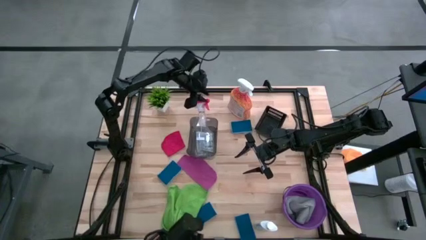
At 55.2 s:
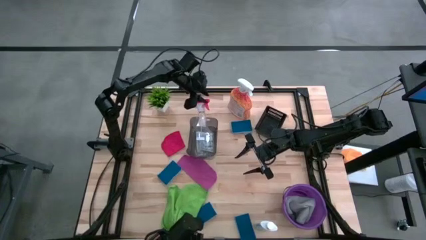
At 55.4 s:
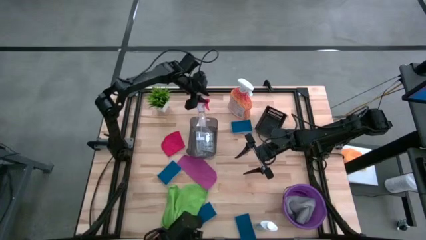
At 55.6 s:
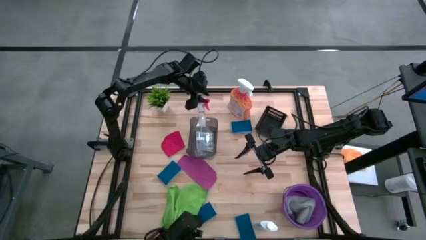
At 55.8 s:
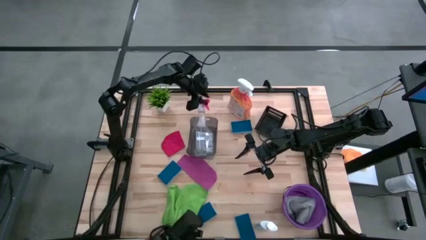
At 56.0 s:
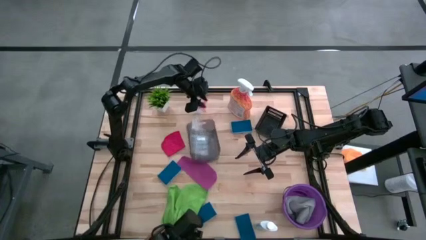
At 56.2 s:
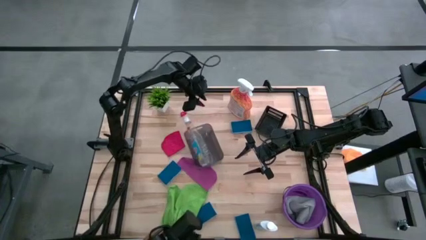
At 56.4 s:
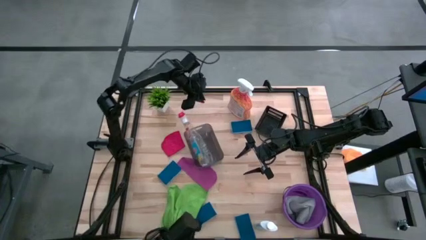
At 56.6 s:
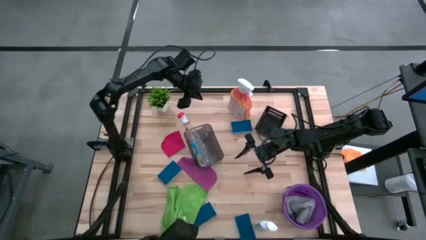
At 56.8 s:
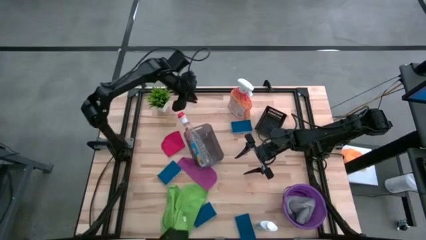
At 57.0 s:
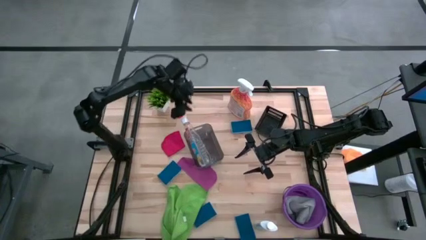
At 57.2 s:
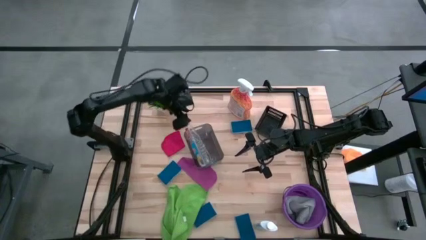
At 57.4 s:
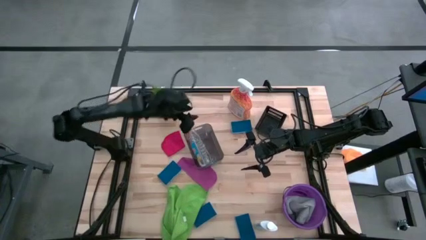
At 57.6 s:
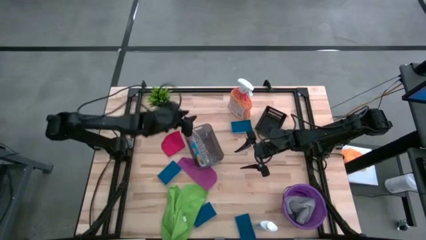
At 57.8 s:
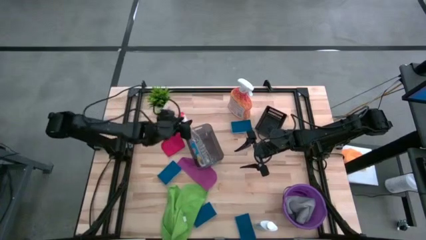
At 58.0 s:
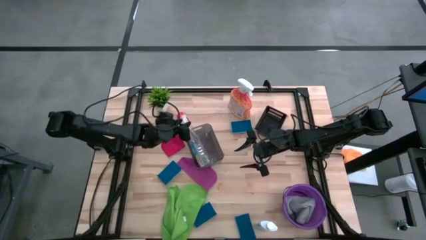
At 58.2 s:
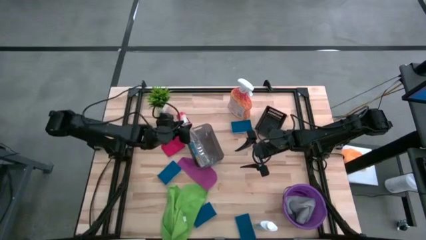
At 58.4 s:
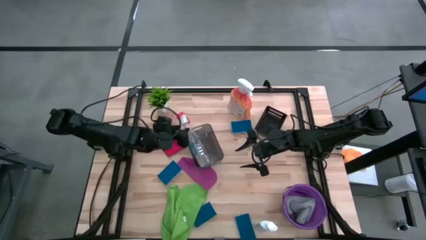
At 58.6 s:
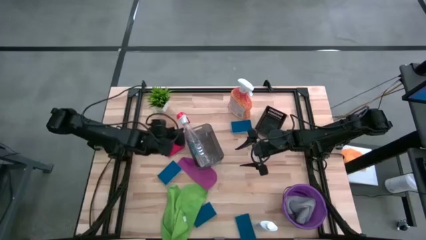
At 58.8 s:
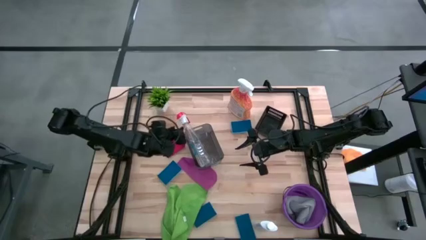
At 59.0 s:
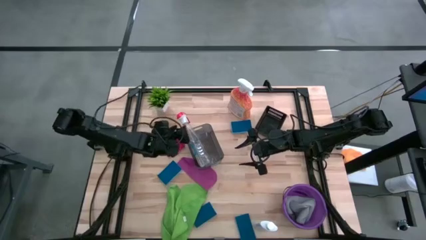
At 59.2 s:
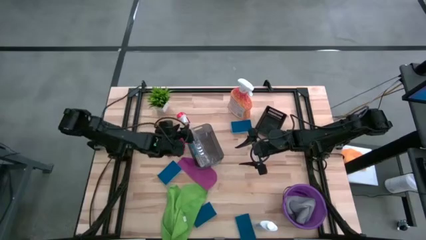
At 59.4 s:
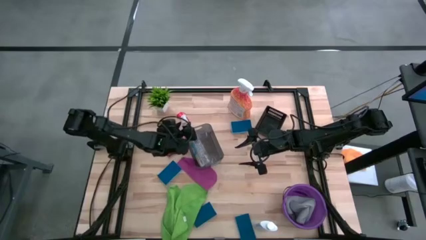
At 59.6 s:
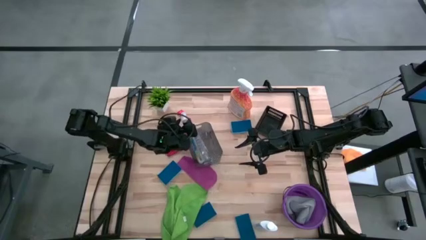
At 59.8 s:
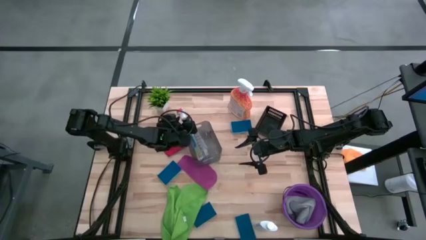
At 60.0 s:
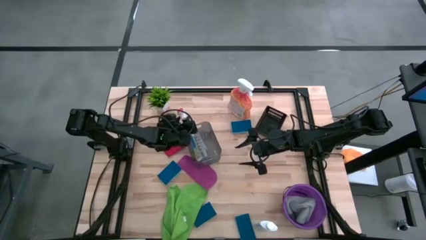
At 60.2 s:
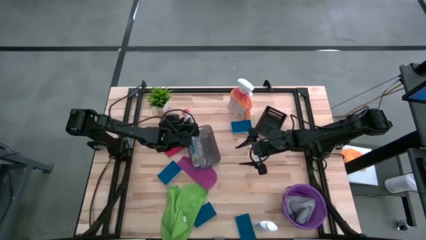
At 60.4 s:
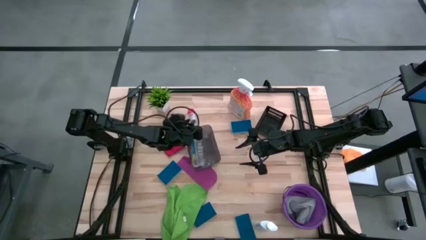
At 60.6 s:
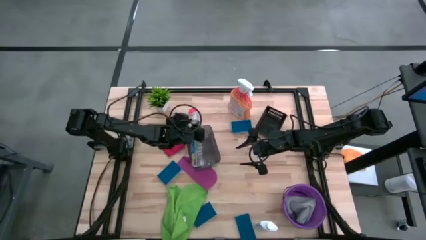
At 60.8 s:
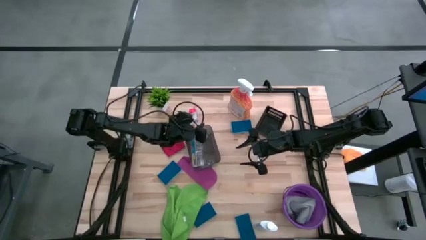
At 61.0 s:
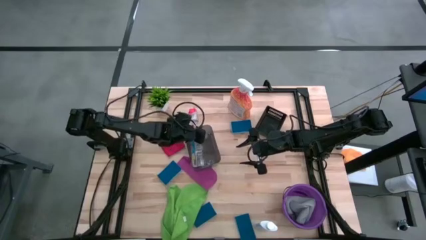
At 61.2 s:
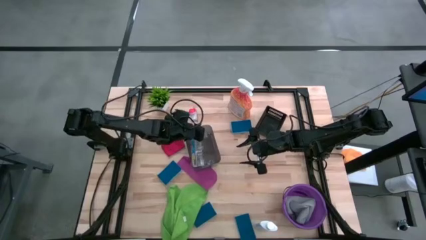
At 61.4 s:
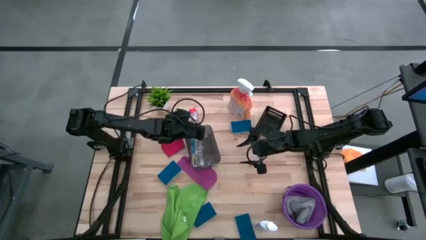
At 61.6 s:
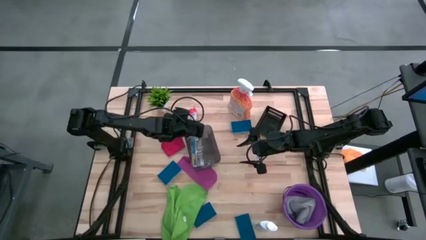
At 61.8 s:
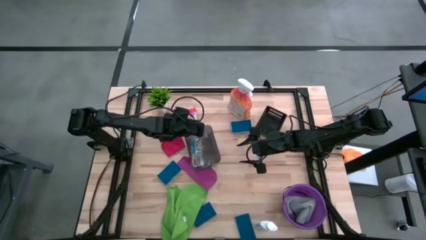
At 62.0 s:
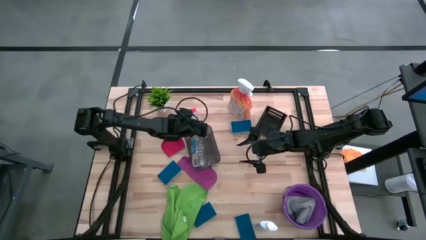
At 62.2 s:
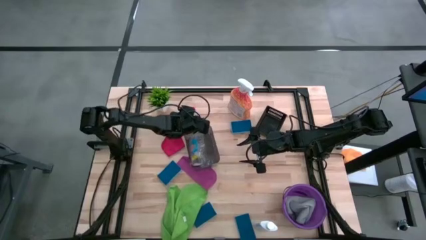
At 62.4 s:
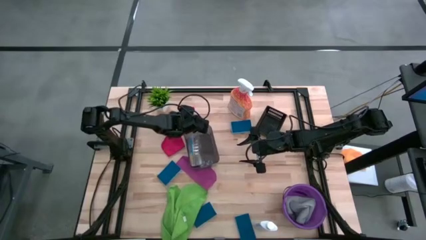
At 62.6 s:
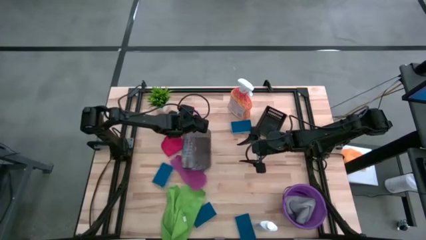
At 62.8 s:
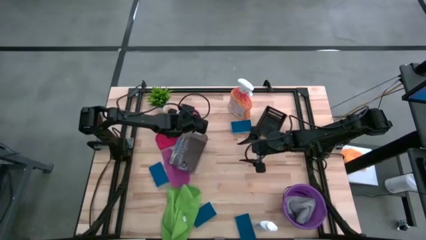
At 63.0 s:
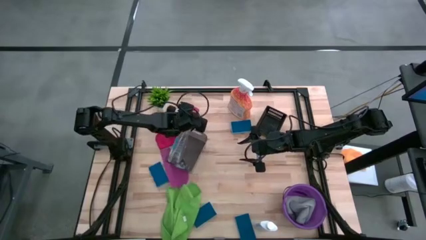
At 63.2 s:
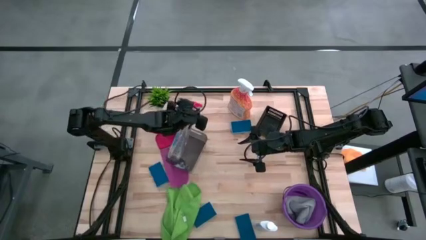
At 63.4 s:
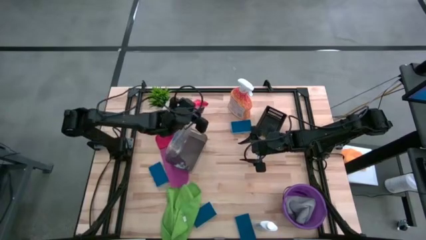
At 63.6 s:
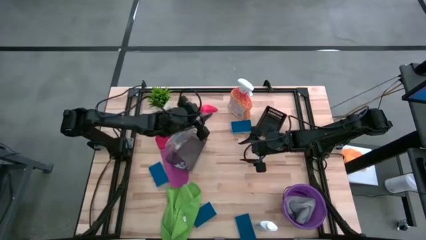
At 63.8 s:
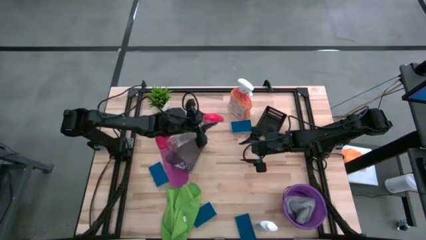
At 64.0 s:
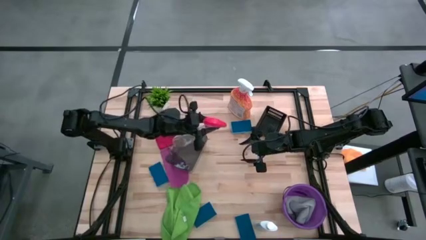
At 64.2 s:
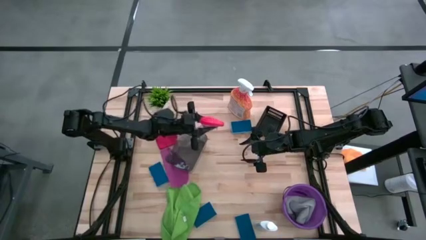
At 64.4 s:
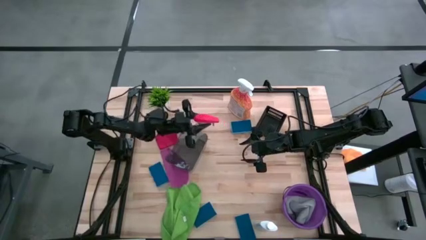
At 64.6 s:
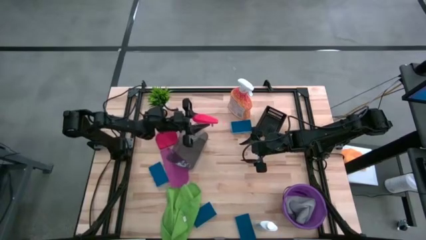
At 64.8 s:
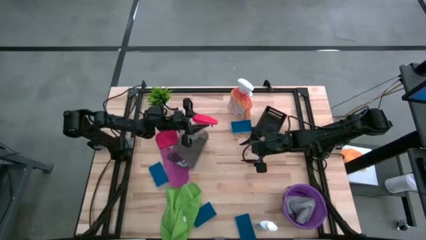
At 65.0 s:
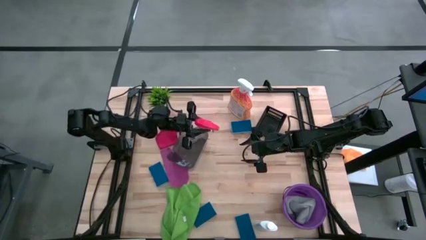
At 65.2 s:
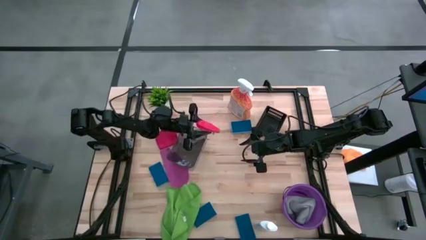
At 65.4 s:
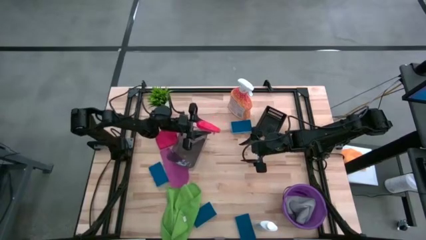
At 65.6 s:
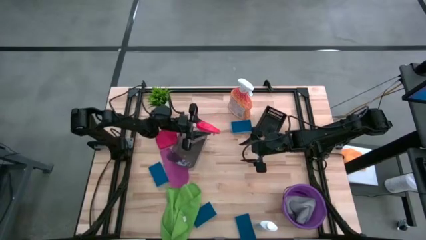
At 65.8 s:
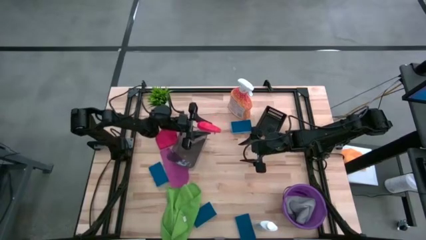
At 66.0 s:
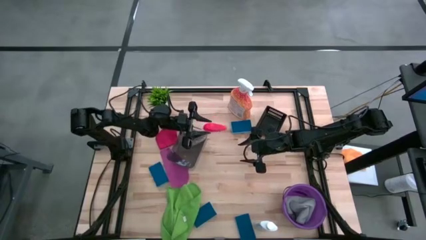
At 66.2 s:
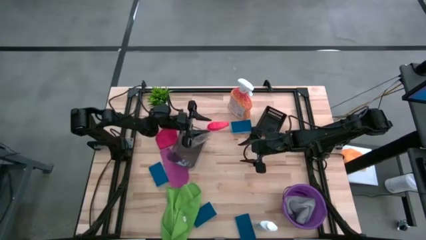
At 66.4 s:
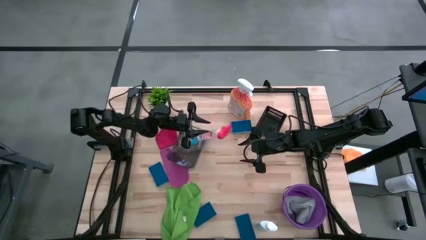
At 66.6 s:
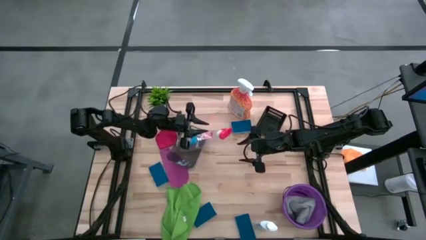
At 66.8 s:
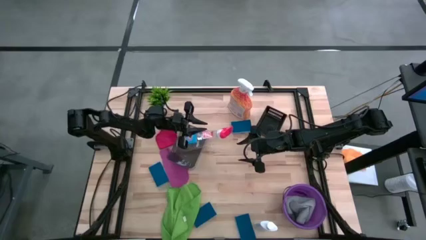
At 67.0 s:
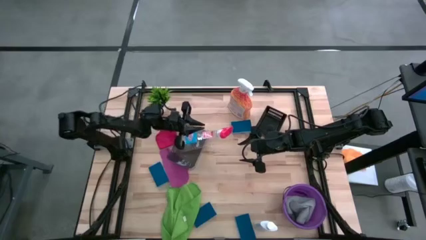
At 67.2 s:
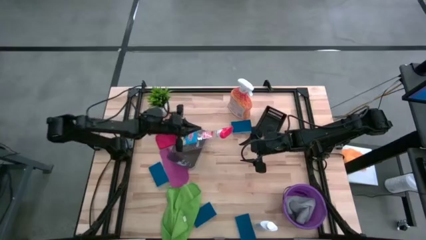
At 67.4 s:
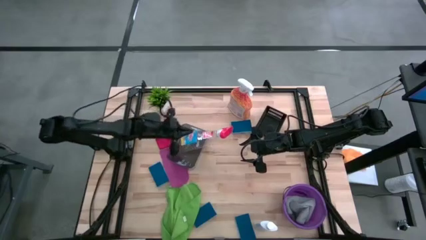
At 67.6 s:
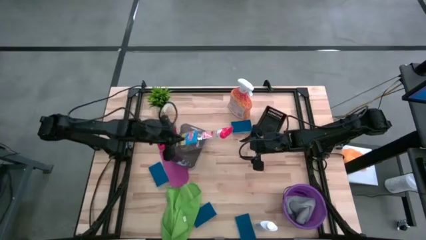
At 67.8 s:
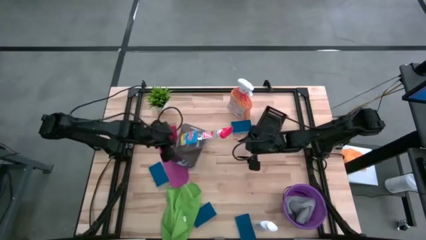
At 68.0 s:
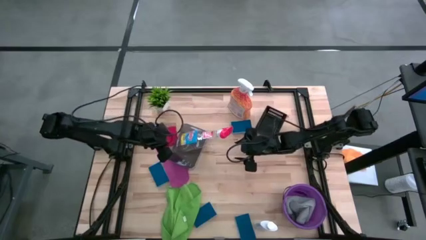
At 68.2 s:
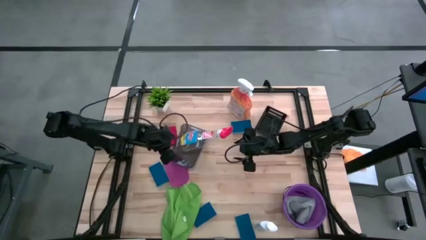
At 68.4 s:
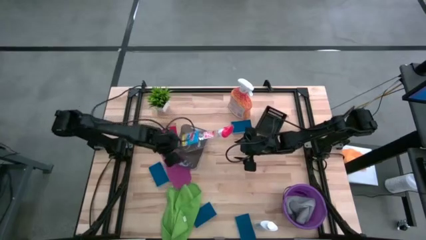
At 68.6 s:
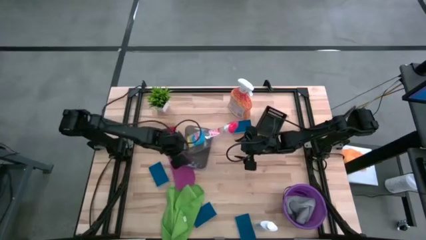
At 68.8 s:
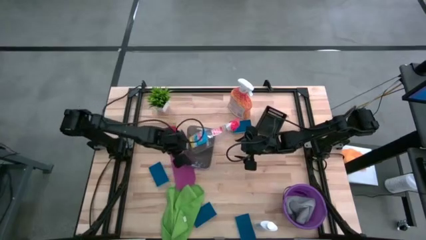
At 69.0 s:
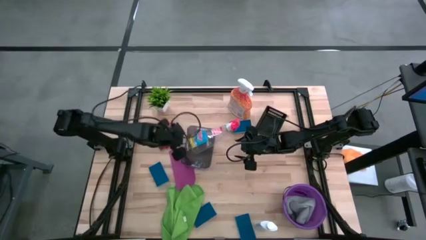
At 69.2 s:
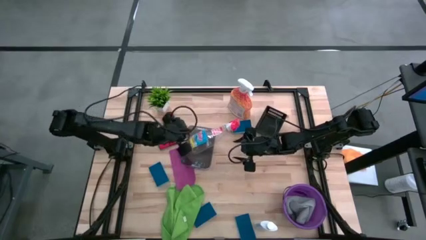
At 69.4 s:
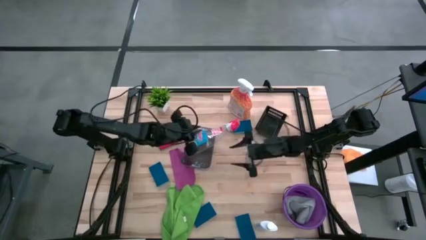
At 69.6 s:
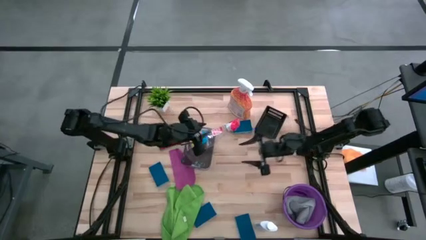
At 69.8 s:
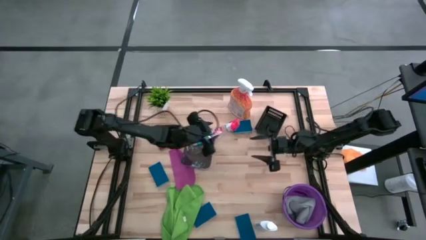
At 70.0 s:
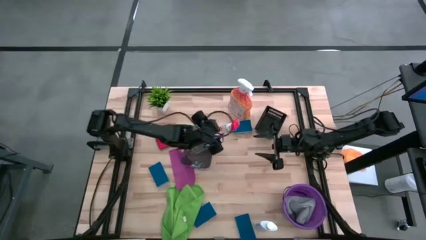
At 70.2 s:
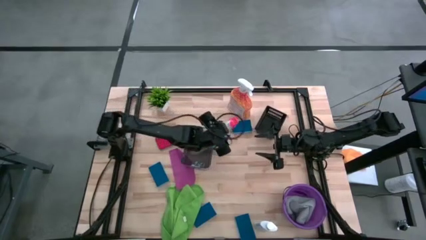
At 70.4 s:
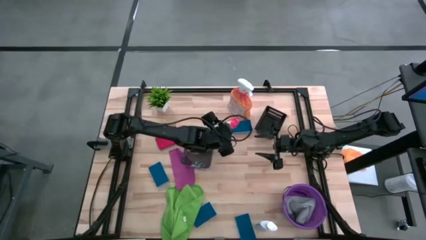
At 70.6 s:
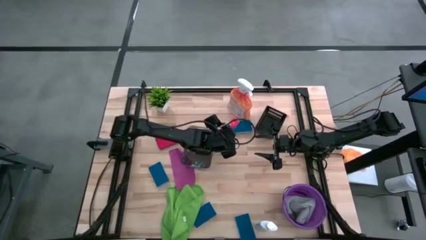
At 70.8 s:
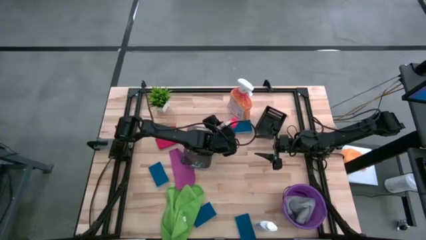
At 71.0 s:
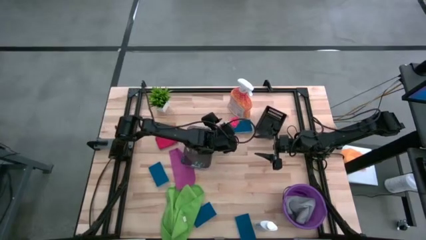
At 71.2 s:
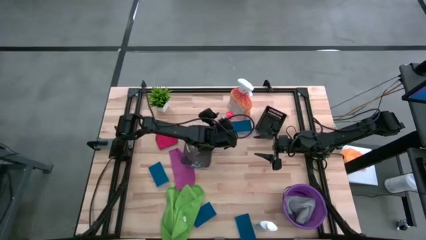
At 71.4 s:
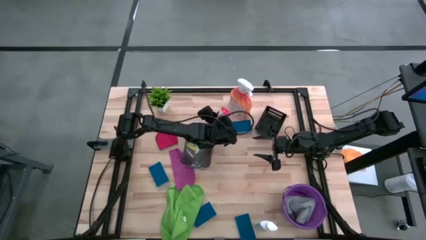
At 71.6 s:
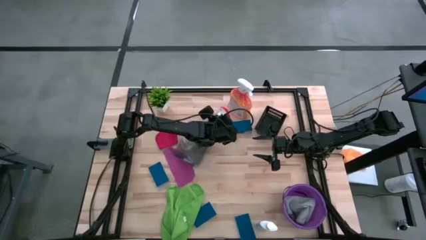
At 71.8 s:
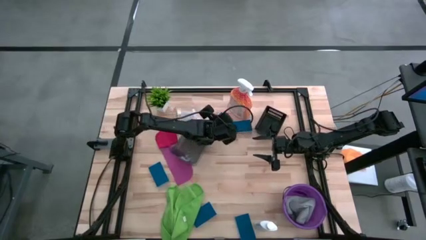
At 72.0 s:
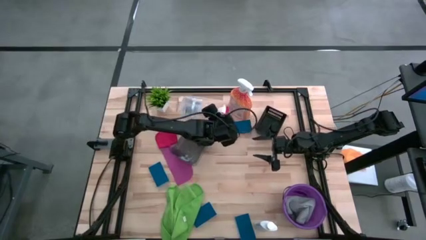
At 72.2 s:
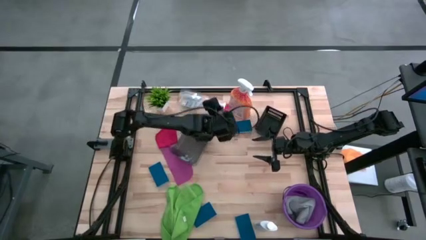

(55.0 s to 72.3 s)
Task: Pick & Place Kitchen Items
Put the transparent spray bottle into the gray bin
